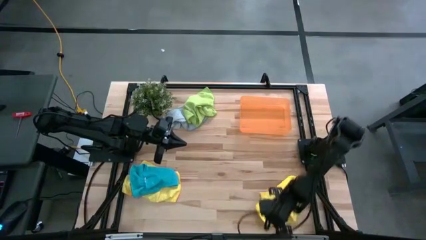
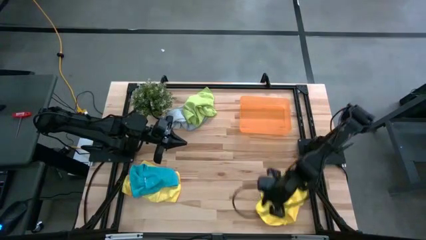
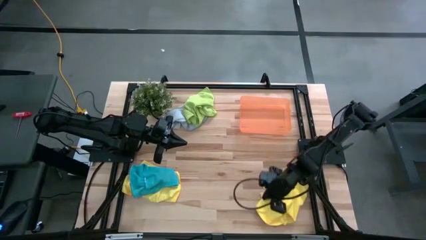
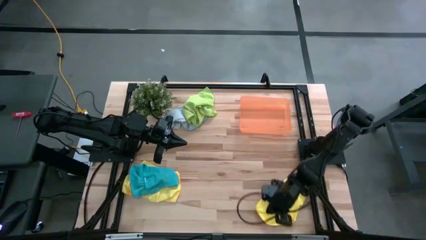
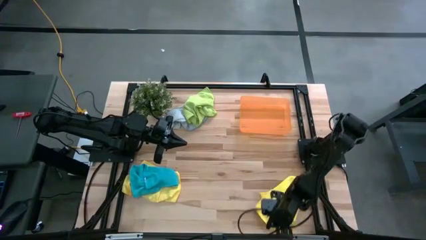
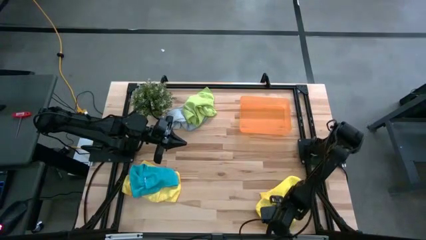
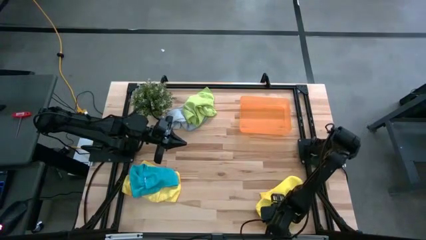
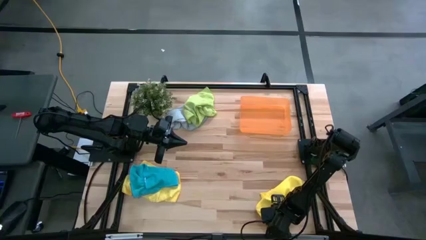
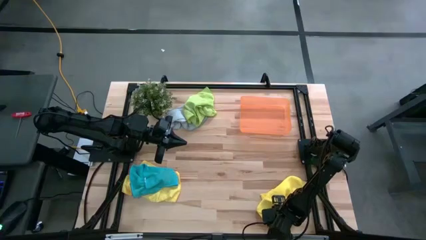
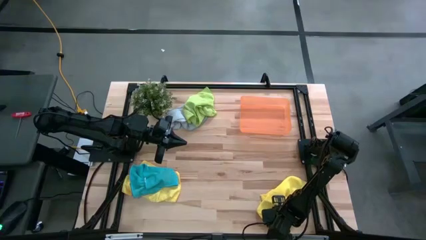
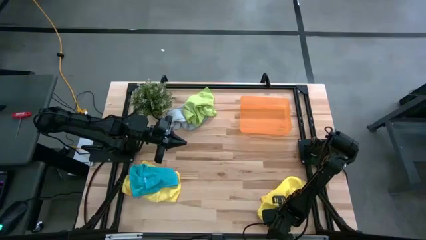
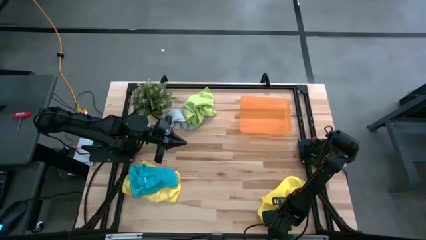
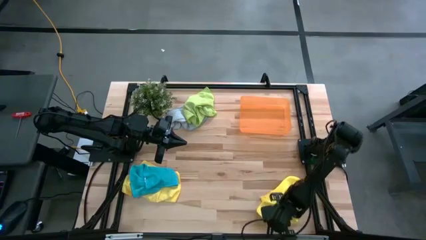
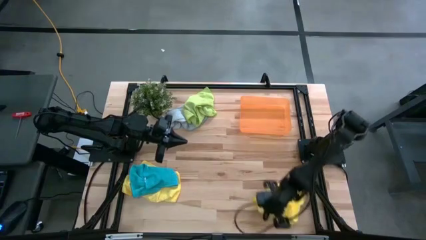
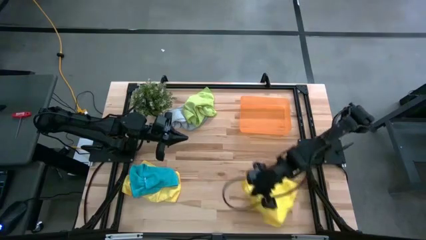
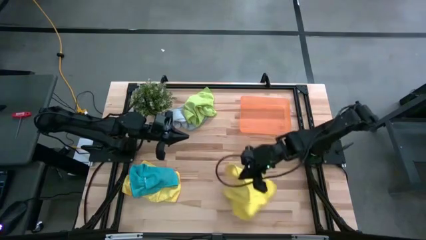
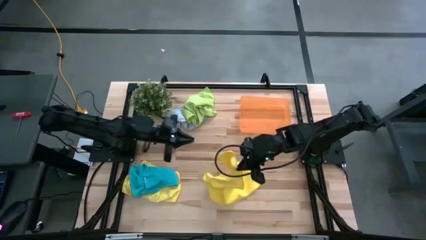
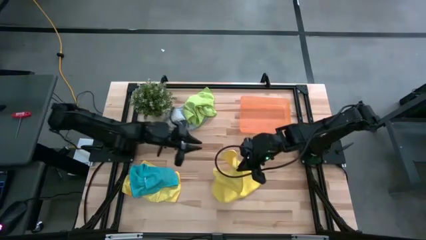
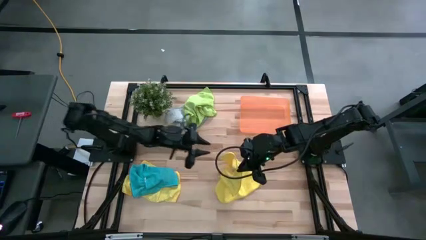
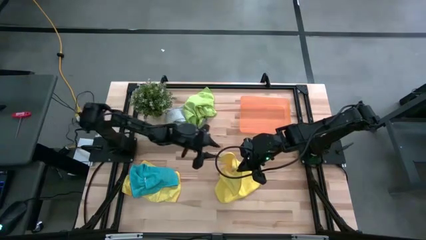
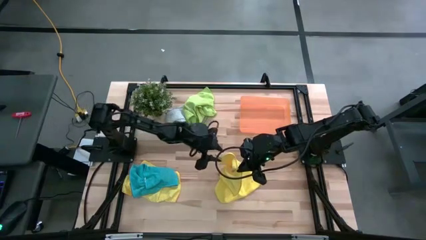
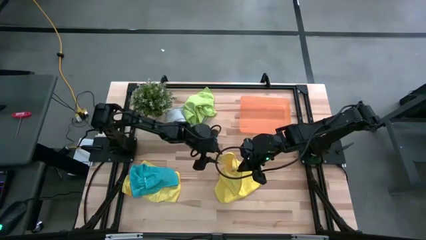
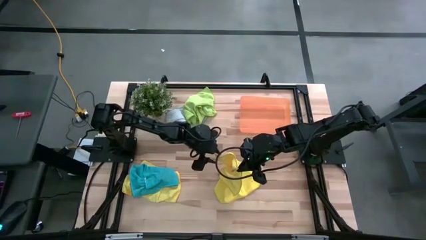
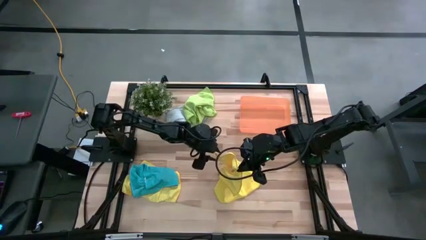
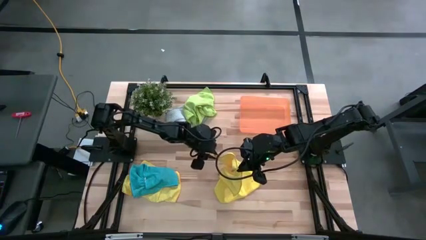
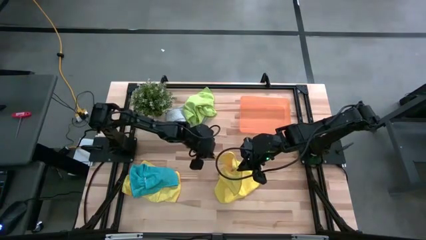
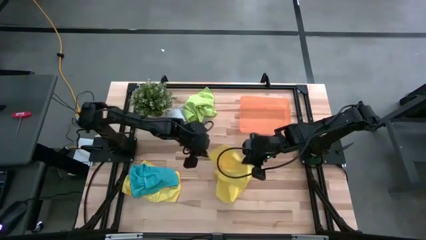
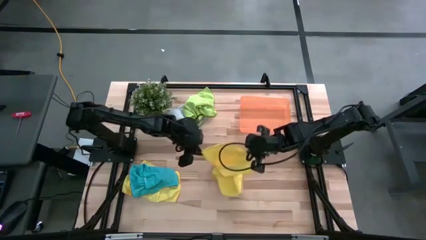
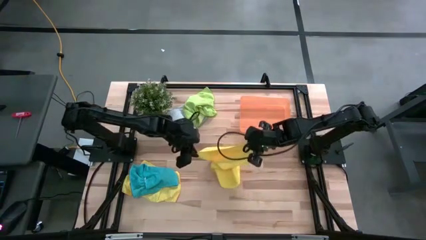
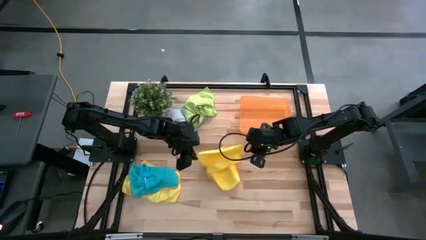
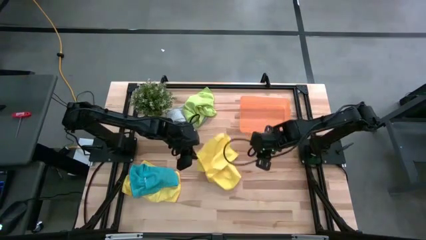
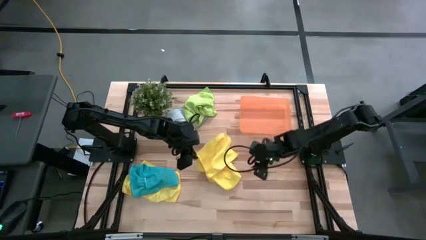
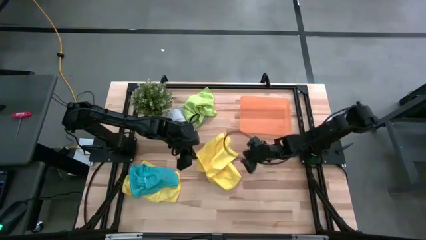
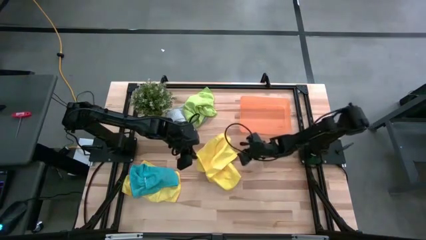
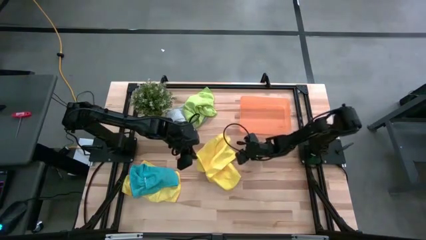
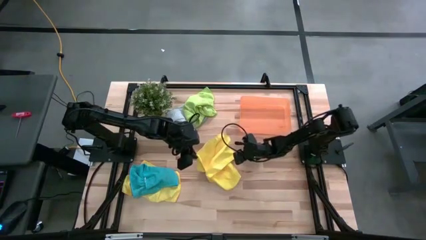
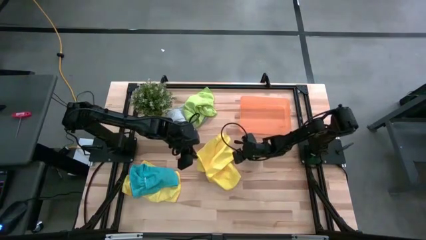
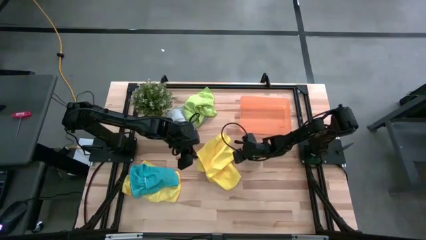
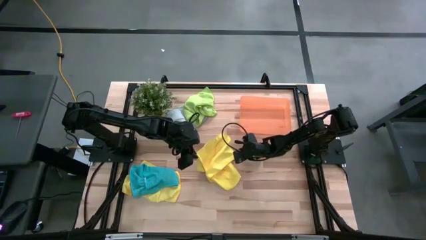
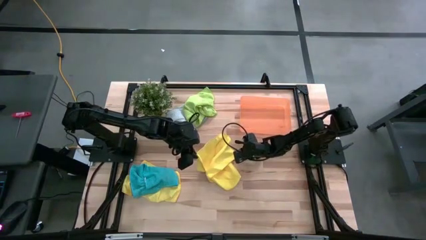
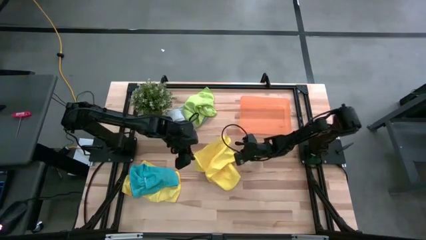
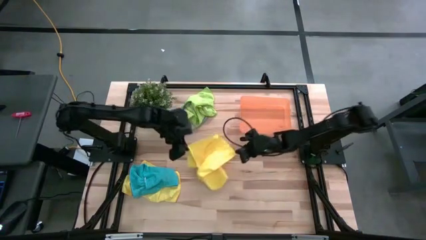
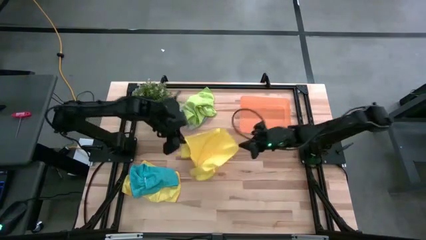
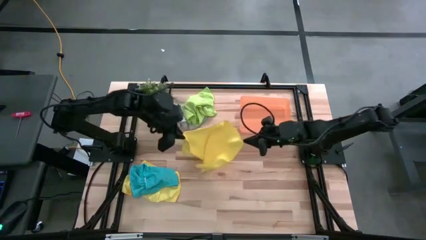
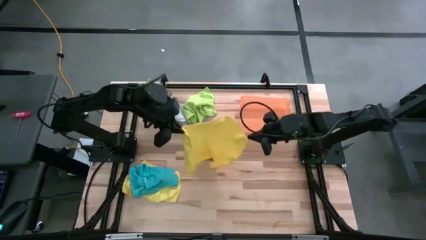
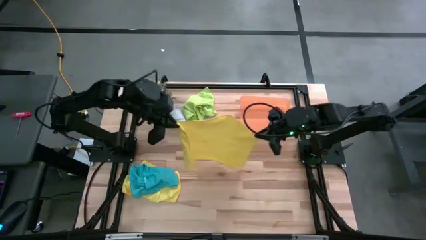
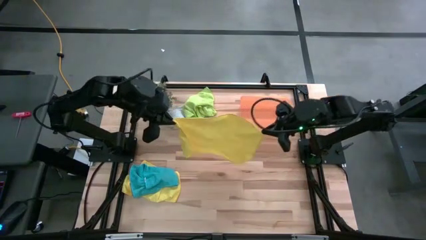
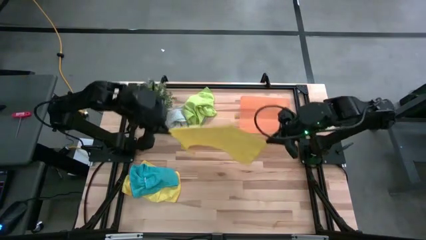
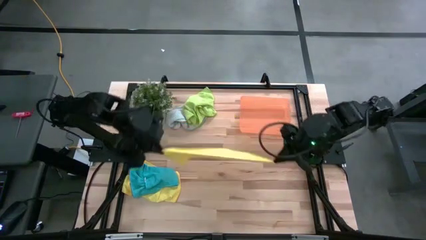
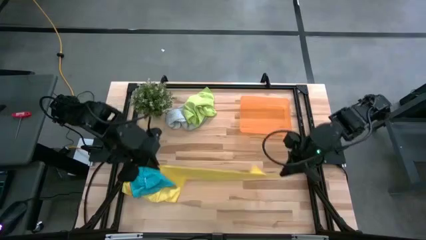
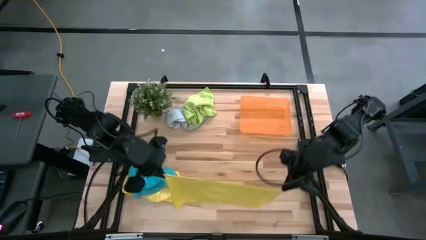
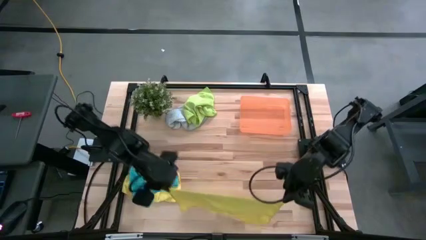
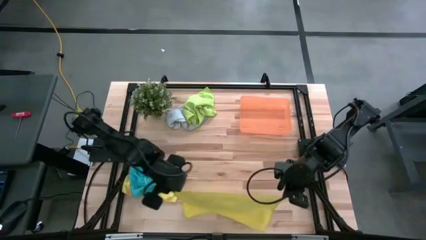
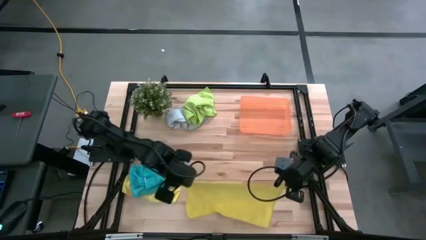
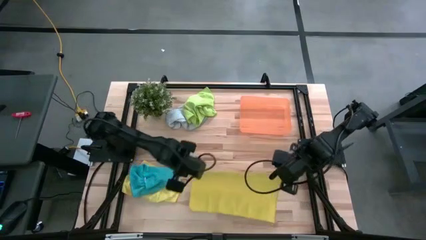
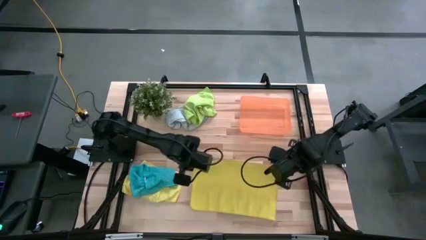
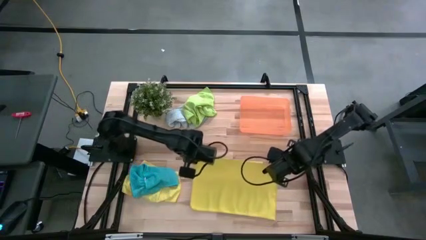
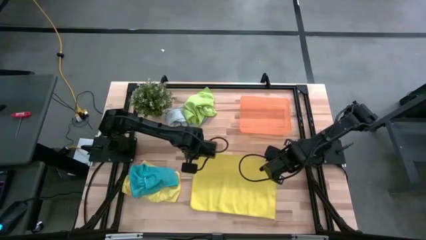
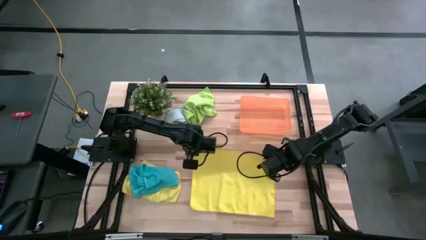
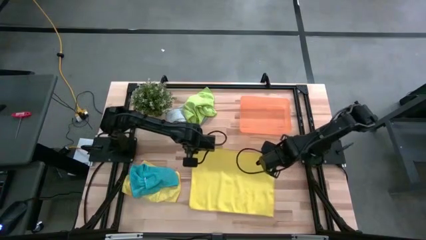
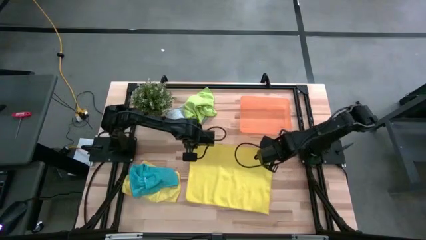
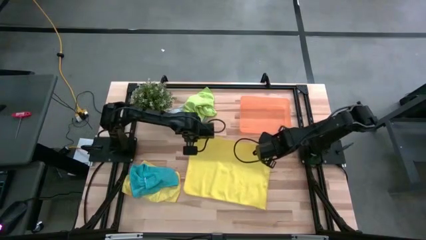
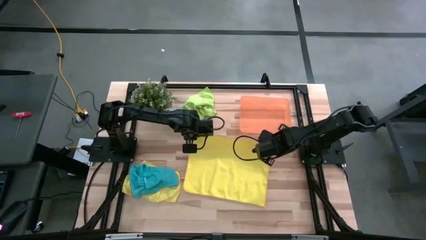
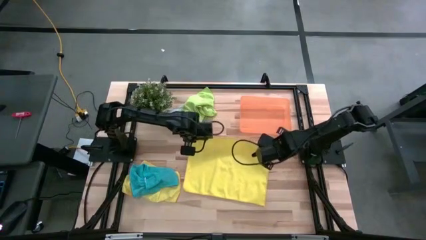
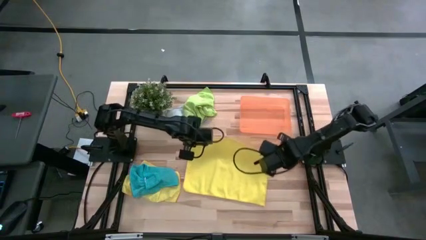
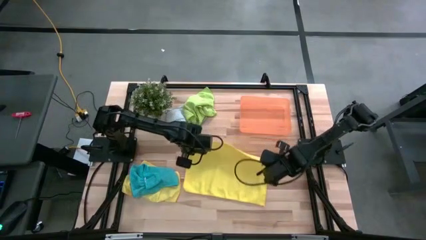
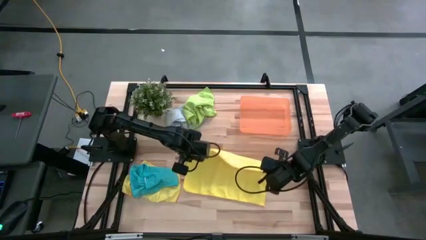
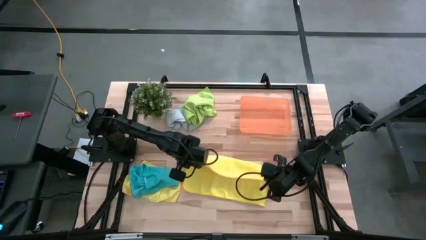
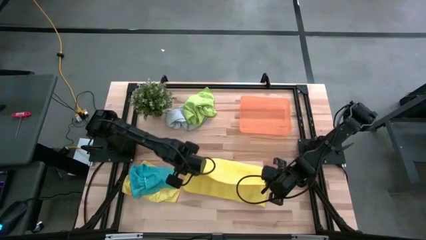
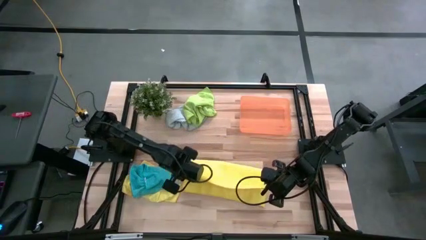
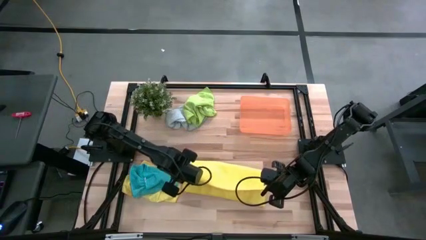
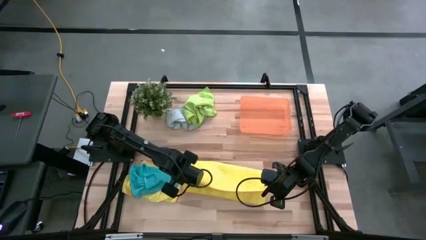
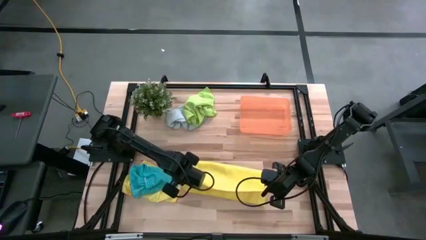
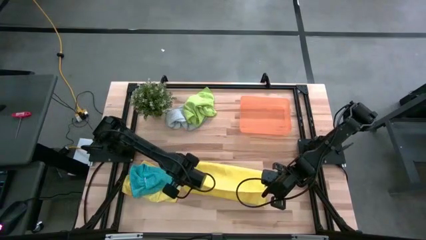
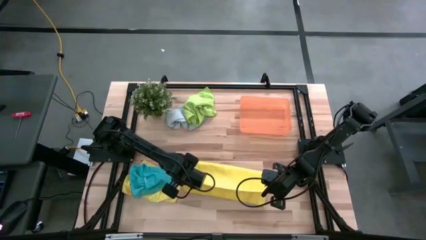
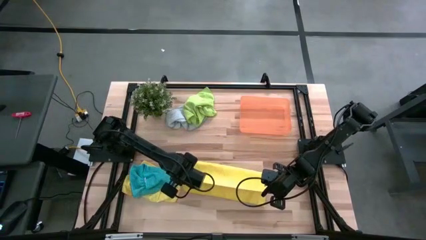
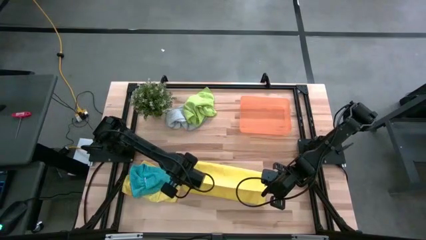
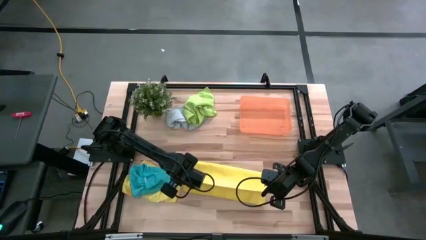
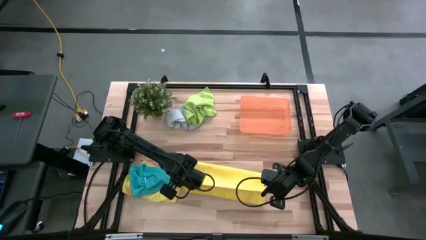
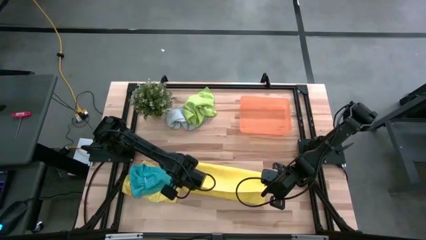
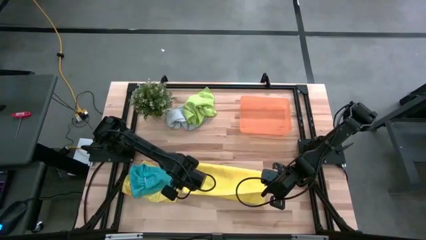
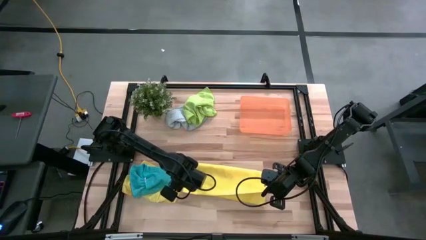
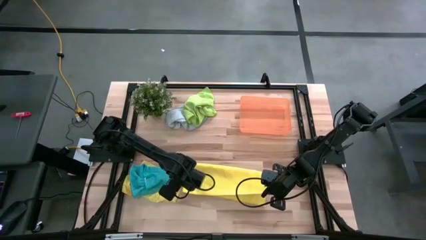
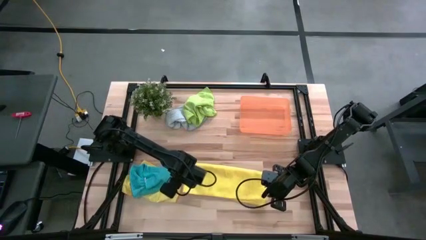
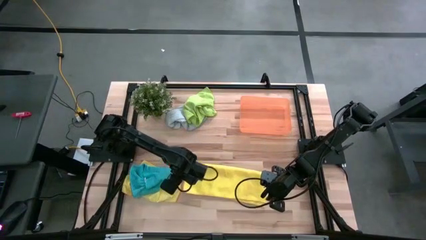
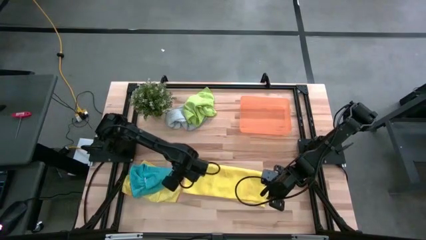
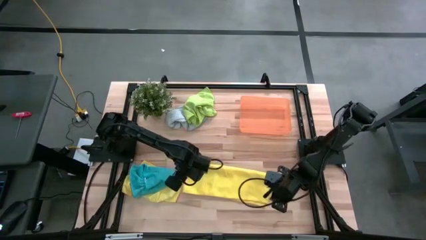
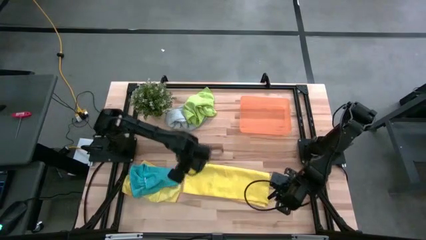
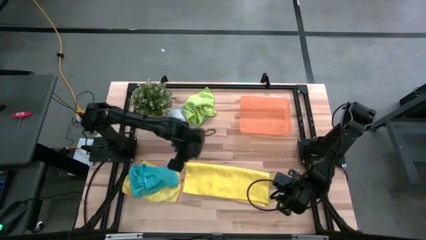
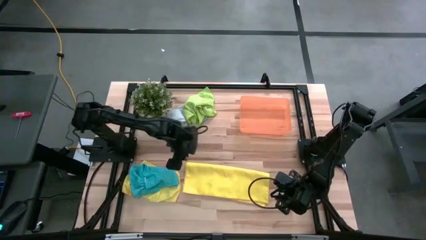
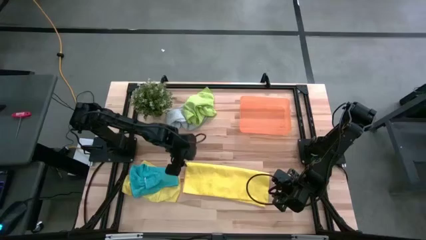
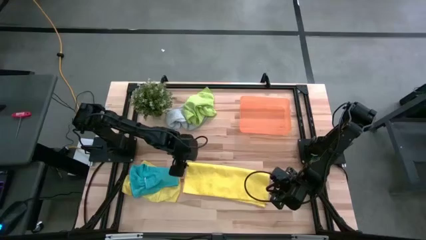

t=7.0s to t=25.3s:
Task: Fold microfiber towels
Fold the right yellow microfiber cloth
